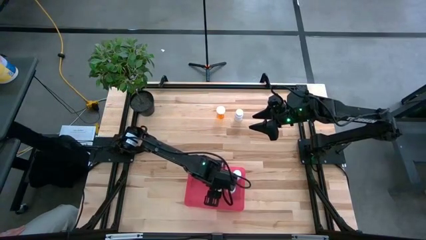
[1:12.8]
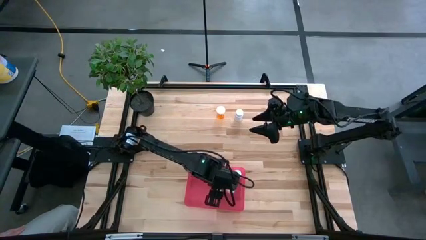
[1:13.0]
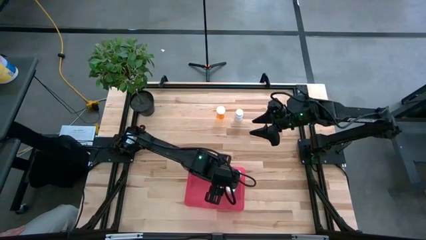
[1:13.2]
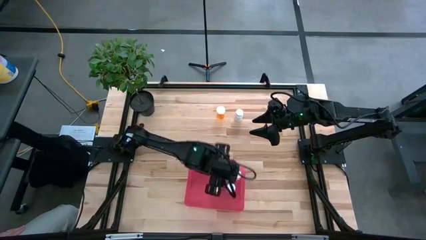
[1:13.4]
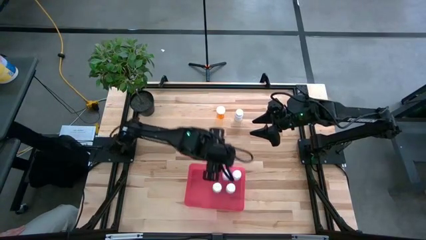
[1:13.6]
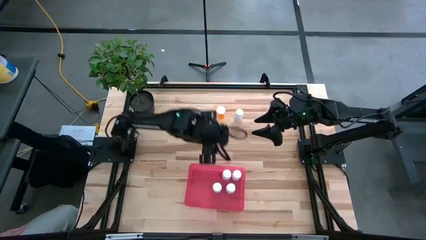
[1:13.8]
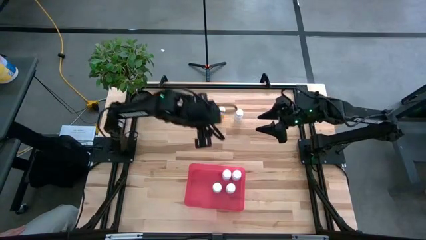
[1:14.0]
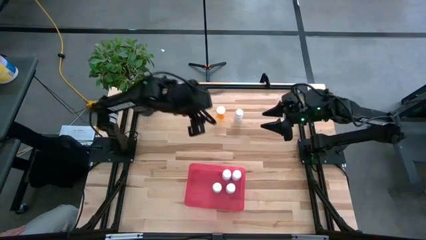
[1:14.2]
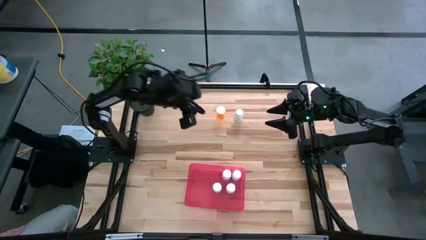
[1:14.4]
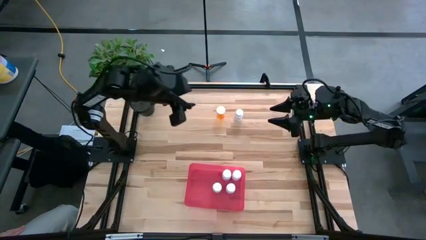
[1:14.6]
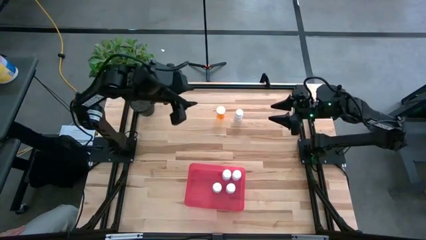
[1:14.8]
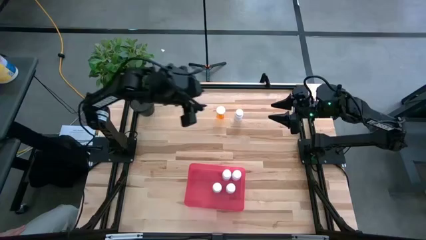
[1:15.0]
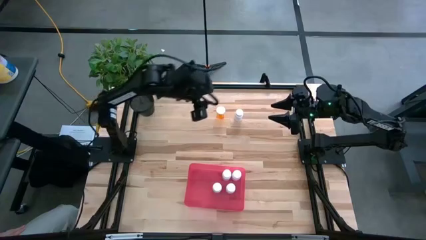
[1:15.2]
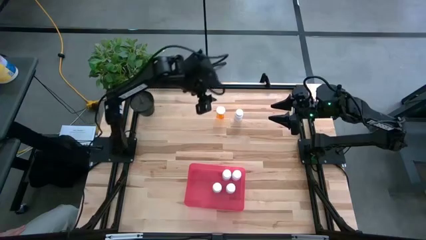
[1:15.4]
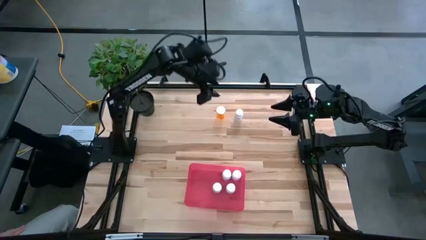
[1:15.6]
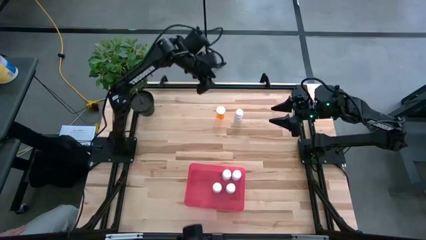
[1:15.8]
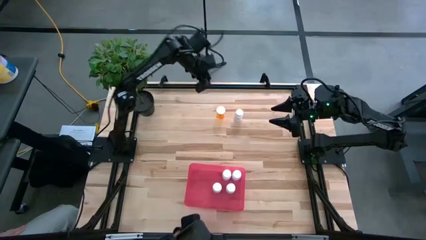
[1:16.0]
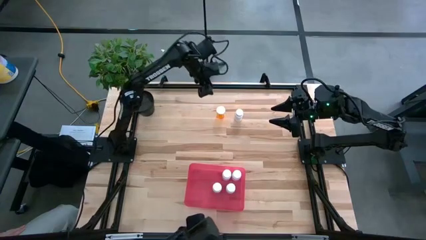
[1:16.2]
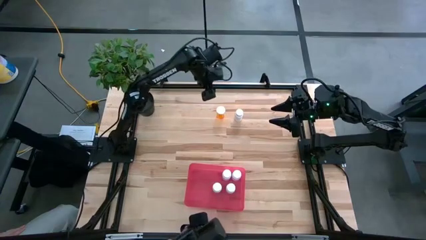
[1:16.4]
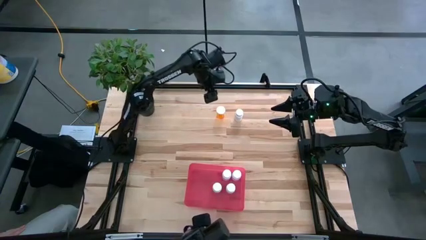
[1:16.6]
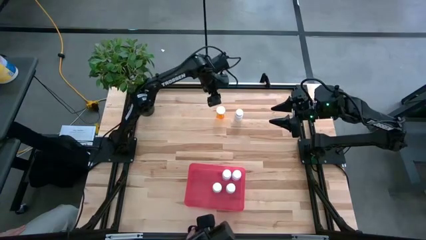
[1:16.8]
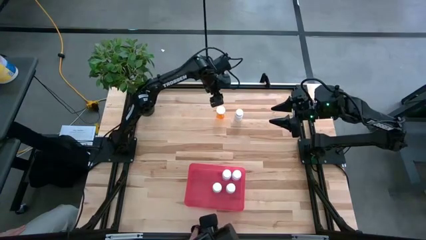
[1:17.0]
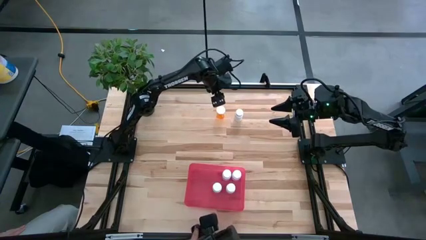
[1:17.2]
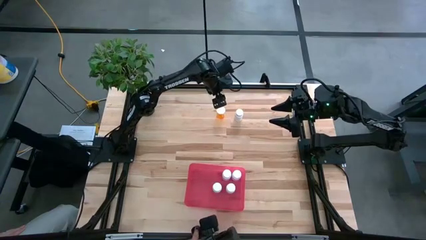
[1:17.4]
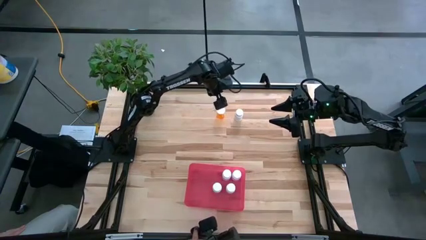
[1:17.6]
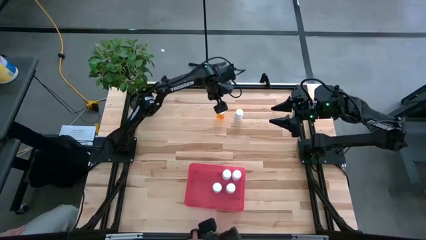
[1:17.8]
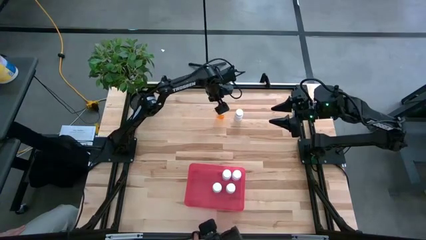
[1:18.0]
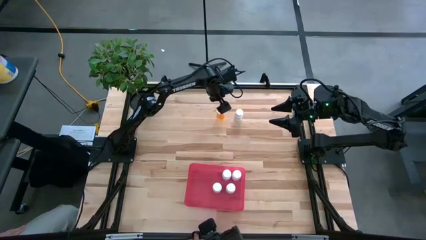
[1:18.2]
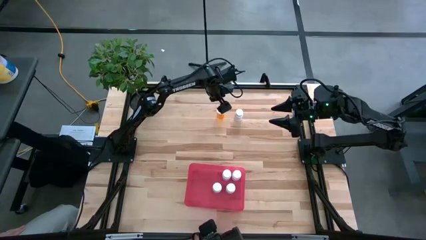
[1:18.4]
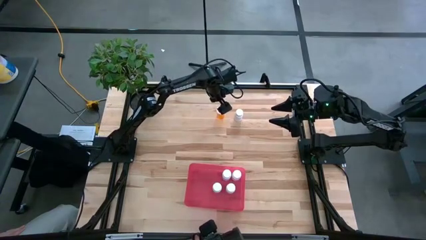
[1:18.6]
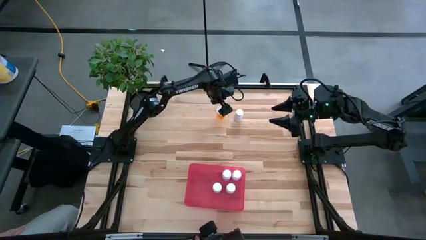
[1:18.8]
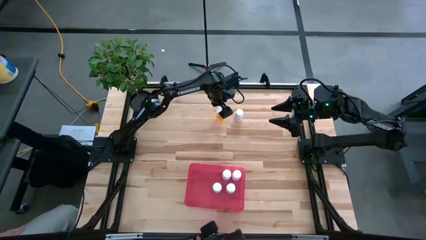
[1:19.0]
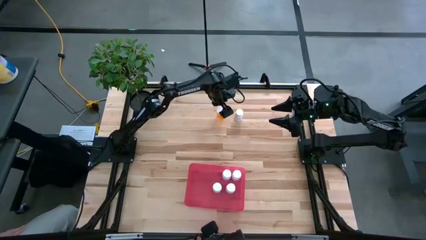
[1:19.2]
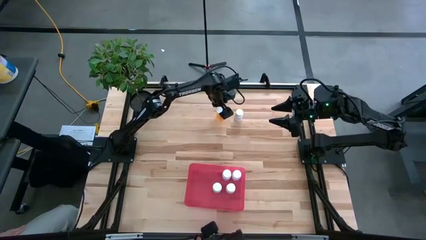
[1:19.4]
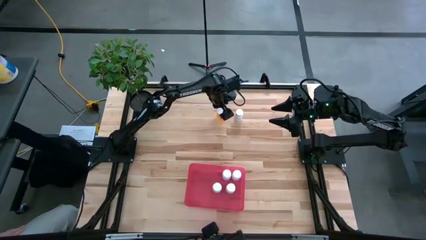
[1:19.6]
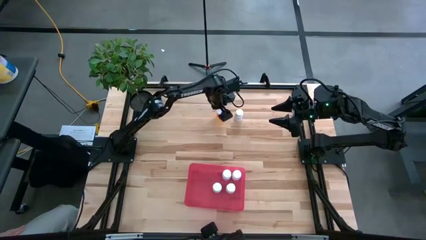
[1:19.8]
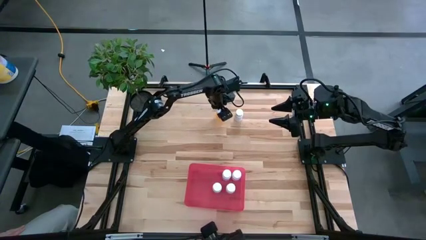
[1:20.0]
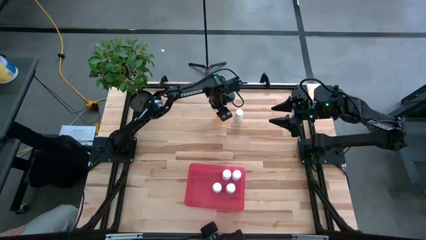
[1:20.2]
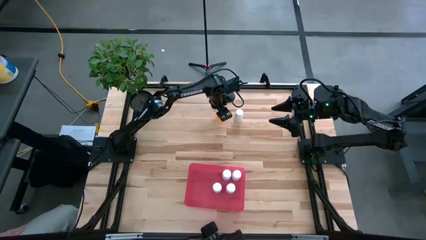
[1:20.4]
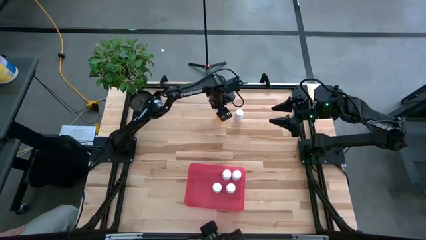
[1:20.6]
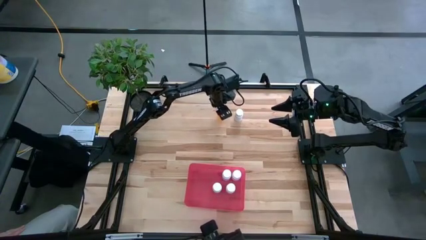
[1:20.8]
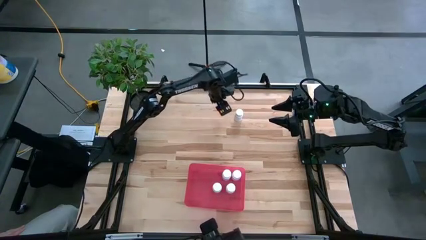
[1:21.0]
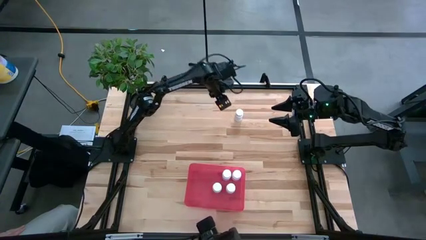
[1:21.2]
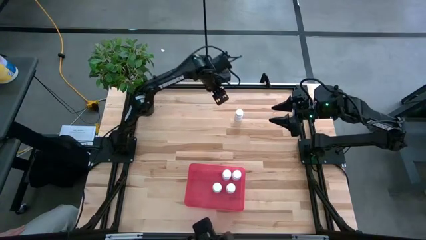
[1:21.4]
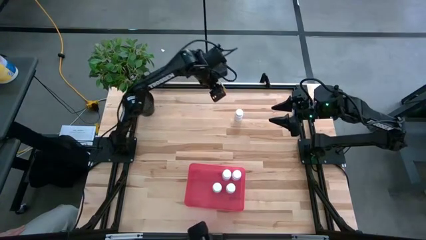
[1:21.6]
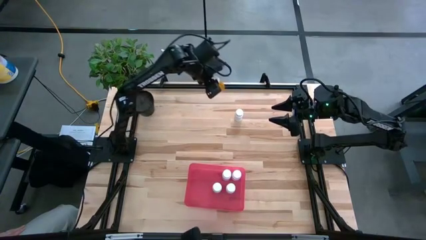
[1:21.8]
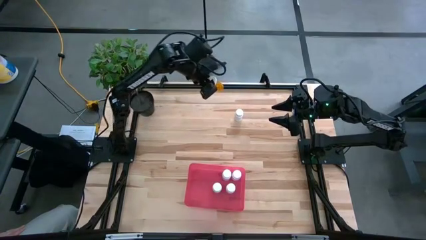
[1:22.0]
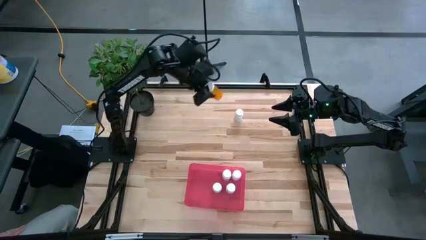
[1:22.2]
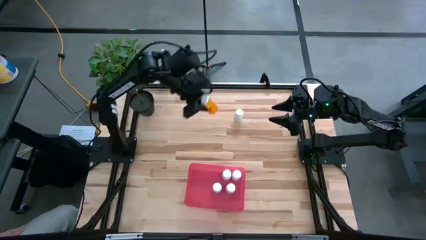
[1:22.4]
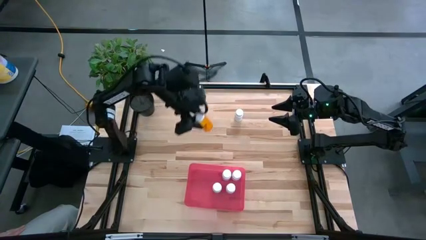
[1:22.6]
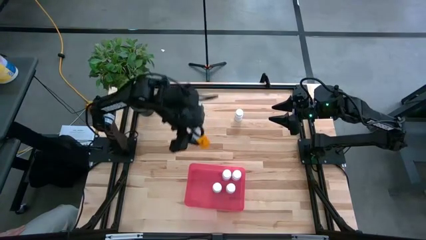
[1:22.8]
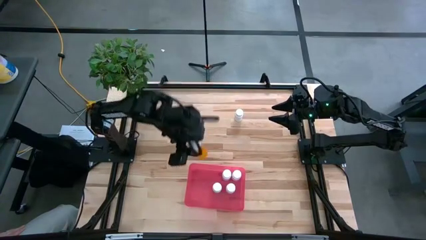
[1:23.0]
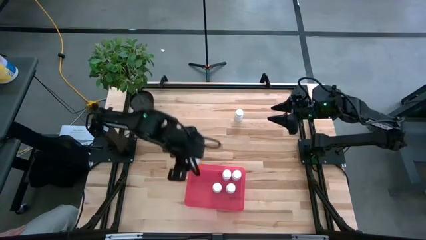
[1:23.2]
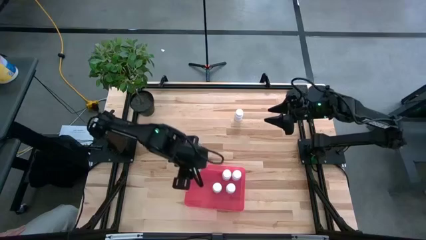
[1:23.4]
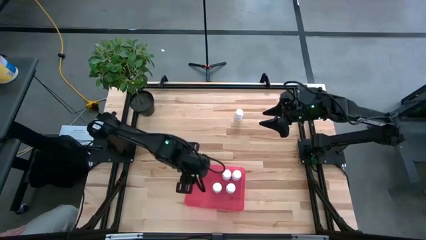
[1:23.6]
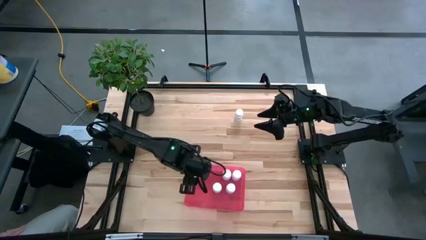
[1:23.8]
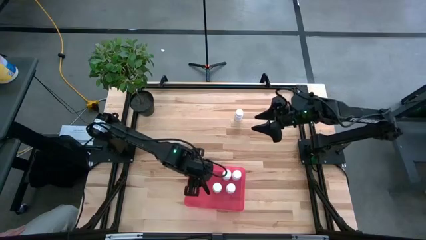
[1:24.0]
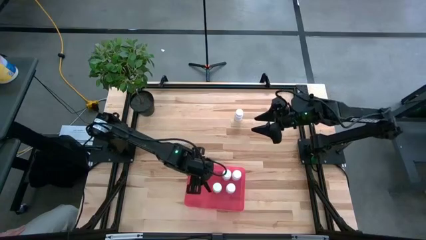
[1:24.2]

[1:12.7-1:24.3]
Task: Pick and place pill bottles into a basket
Put the orange pill bottle into the red bin

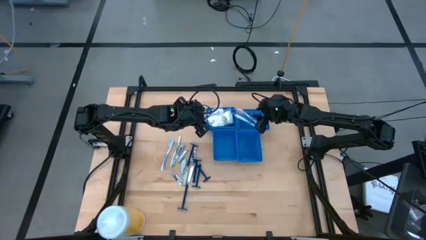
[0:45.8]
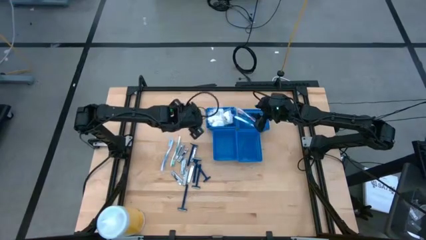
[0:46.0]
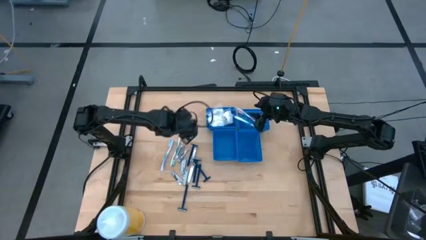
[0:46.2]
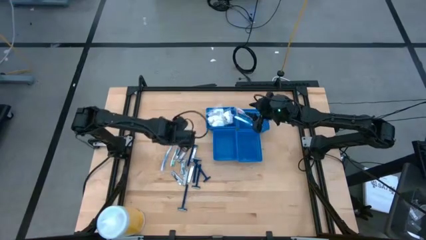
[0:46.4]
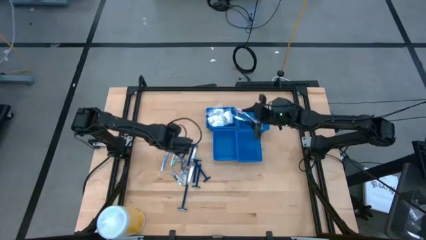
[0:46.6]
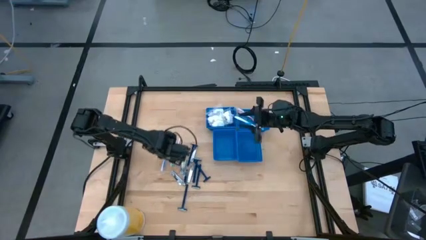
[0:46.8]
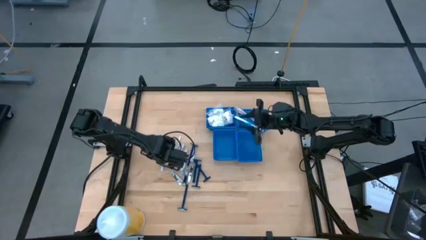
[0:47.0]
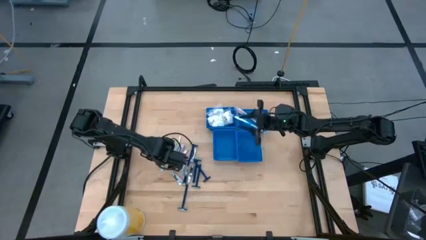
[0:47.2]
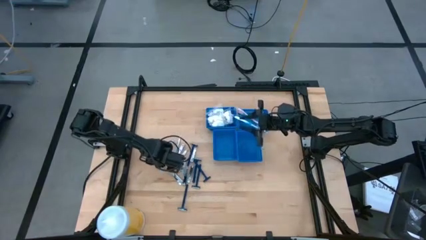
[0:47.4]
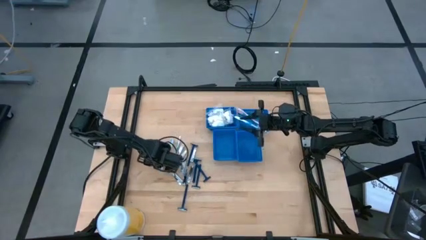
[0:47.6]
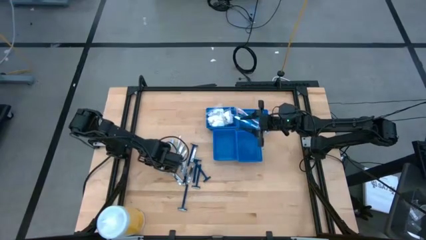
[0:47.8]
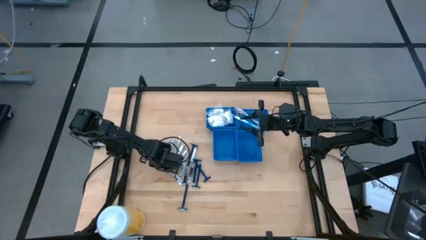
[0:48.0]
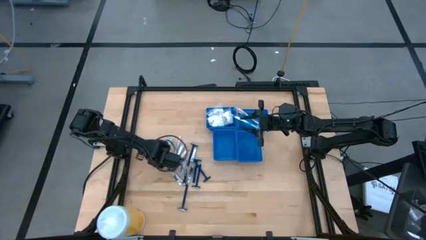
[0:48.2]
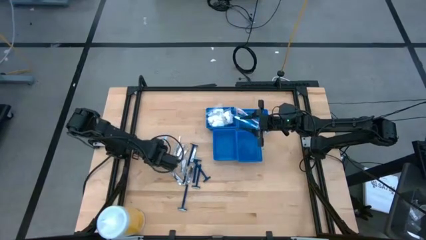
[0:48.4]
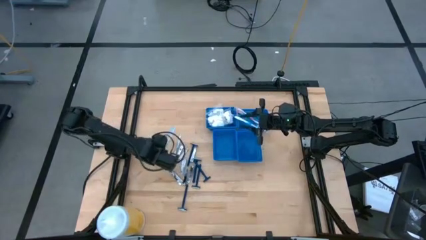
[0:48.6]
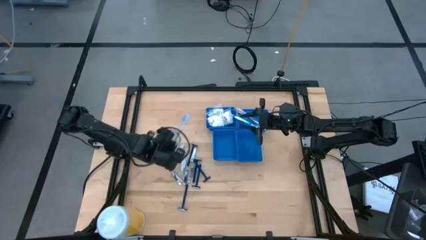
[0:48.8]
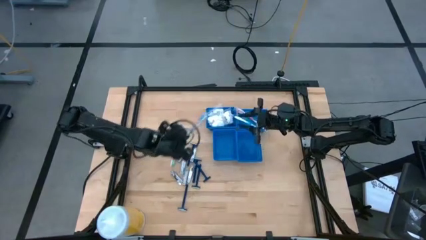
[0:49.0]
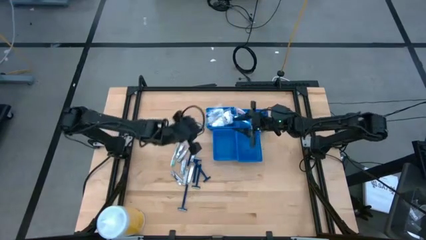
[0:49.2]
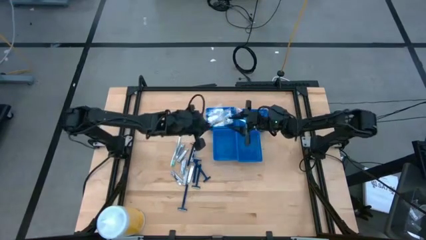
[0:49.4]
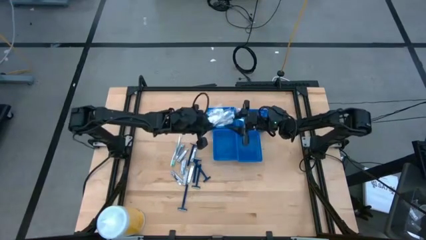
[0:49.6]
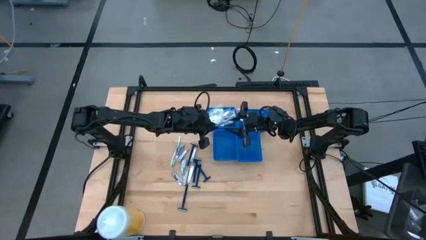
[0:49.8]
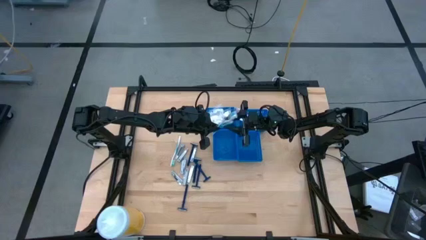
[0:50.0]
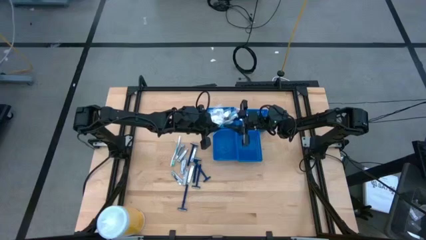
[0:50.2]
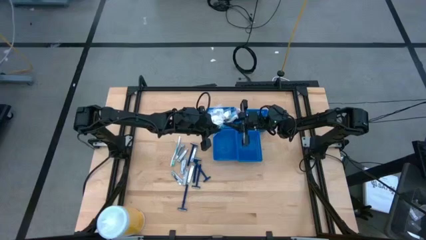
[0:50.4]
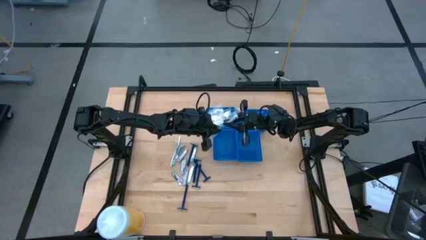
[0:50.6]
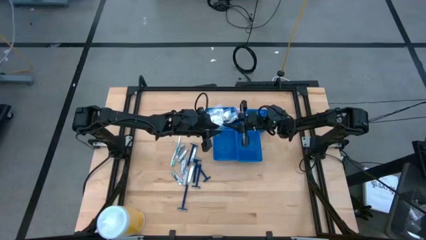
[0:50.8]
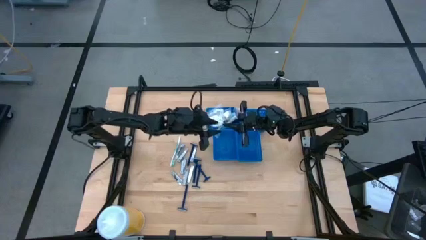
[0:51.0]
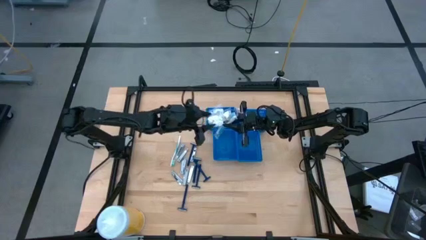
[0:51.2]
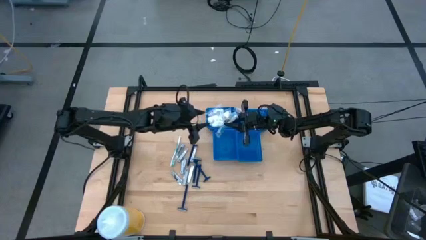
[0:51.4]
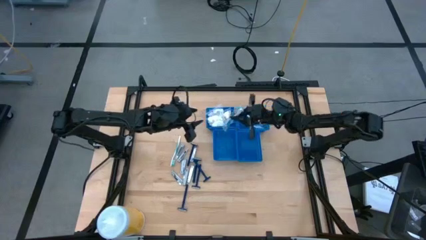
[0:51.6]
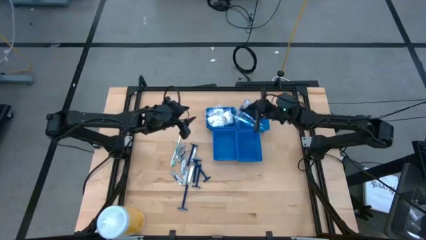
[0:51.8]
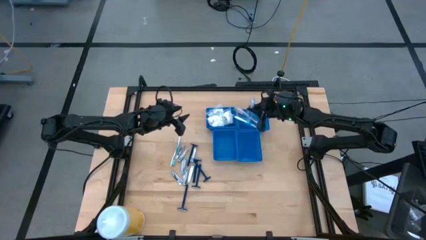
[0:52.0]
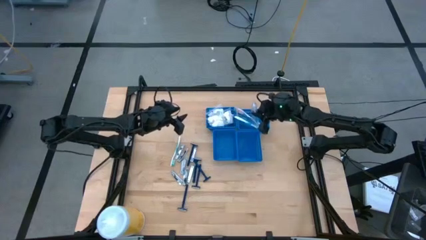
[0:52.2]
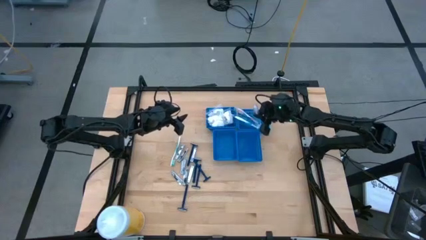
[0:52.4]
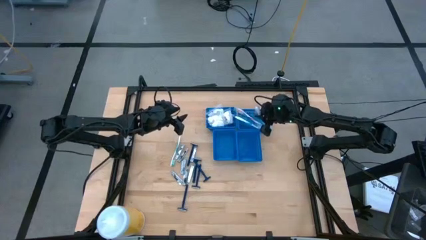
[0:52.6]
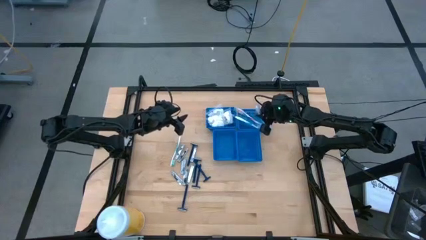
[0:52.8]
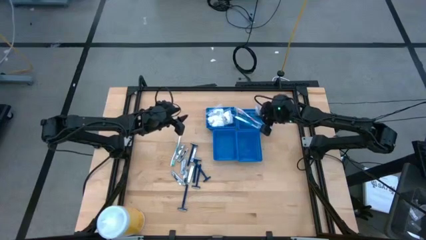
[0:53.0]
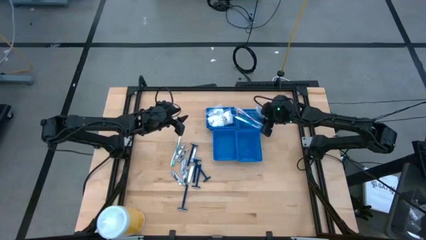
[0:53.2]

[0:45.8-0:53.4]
Task: Pick & Place Travel size toiletries
Put the blue toothbrush into the top right blue basket
